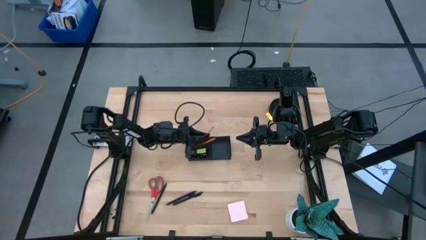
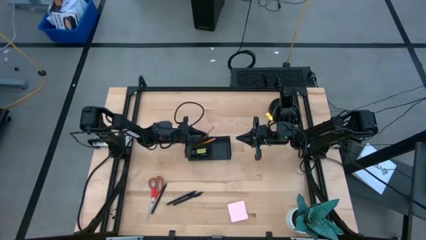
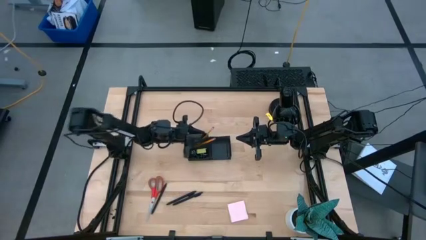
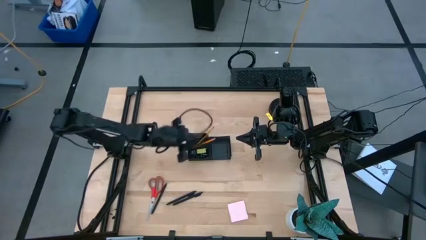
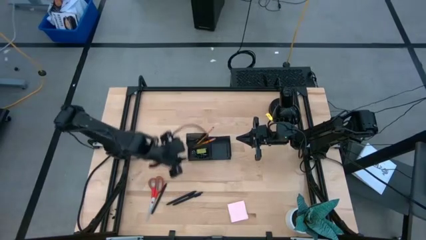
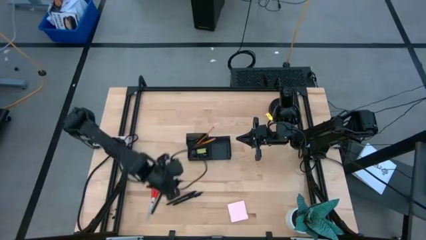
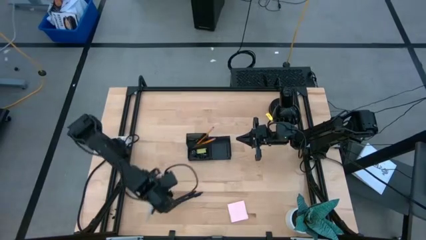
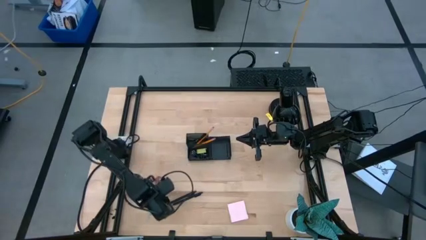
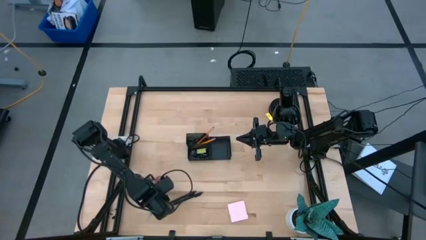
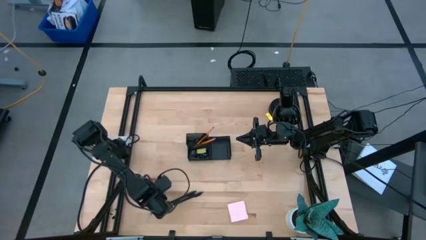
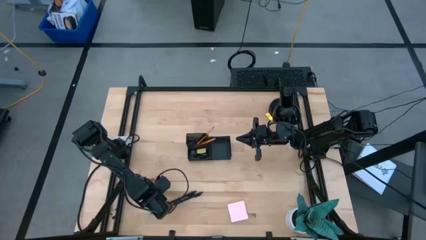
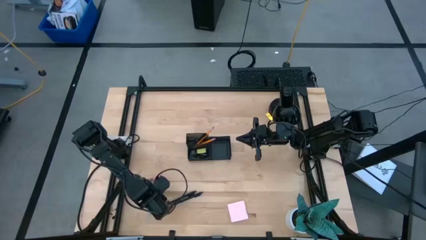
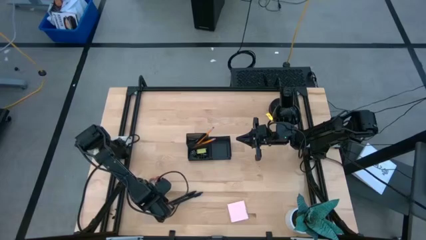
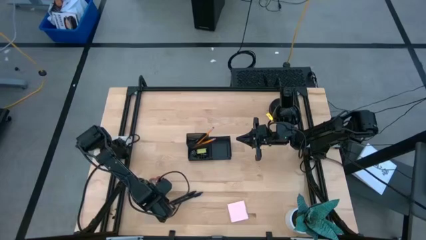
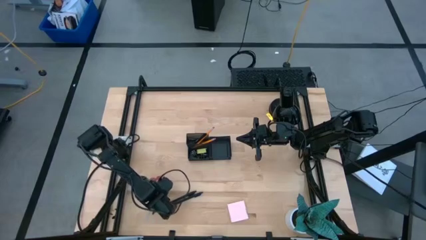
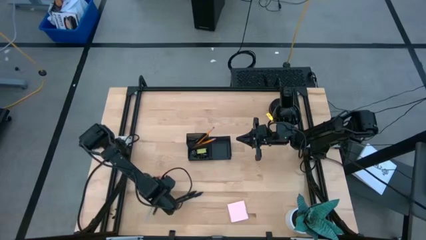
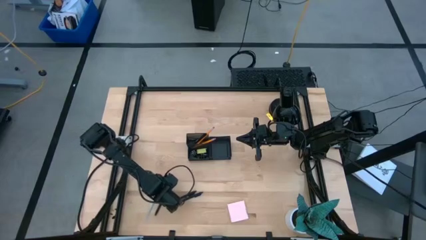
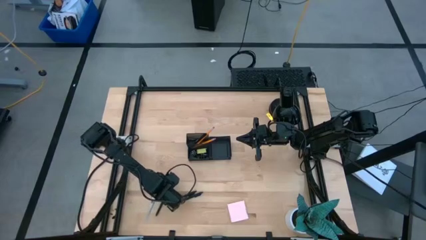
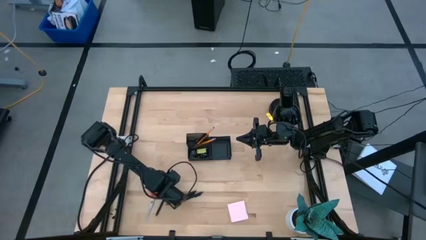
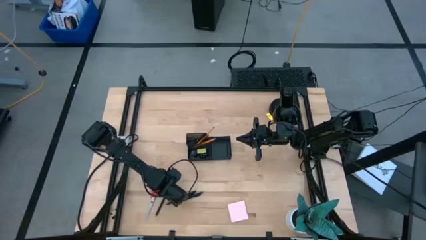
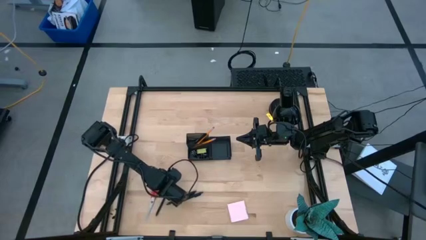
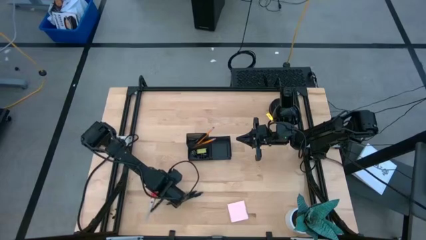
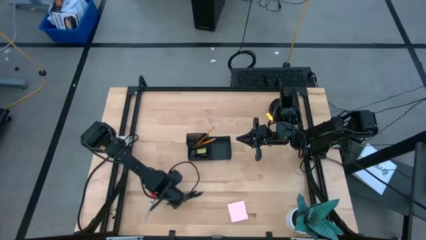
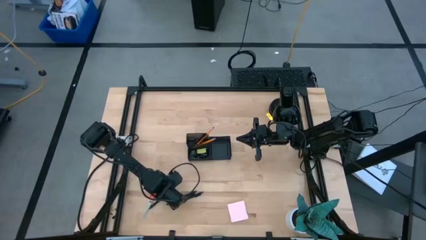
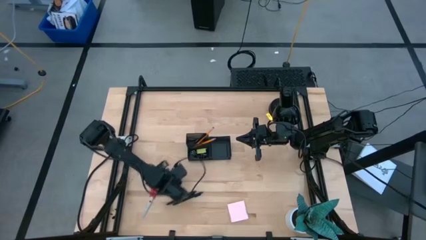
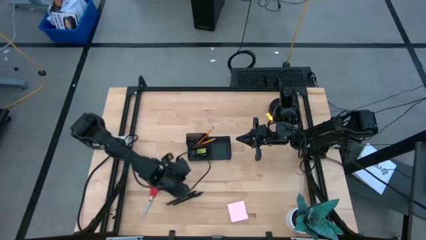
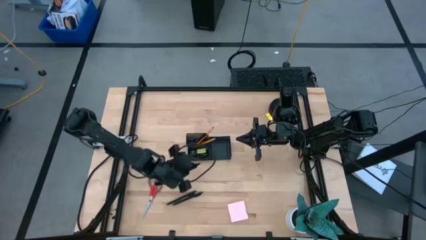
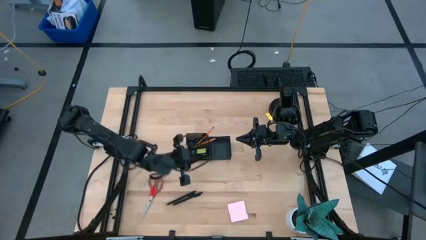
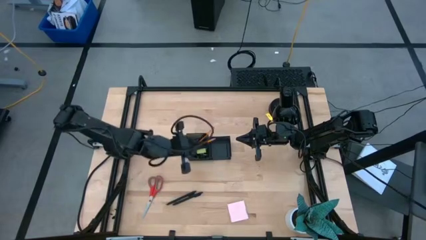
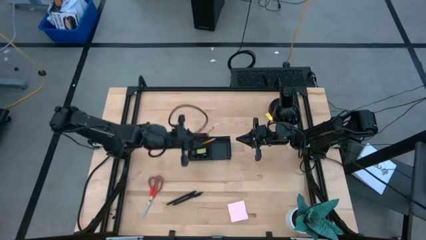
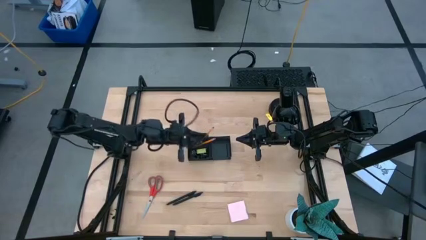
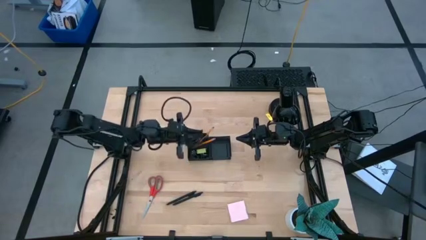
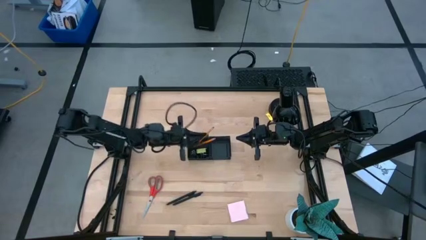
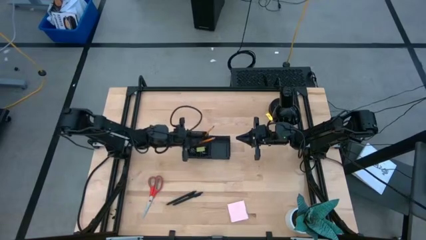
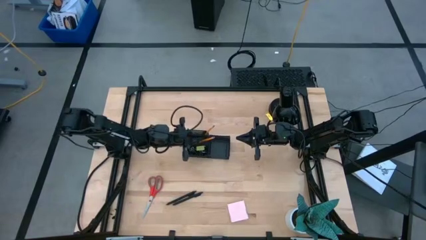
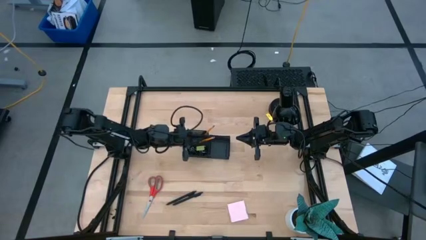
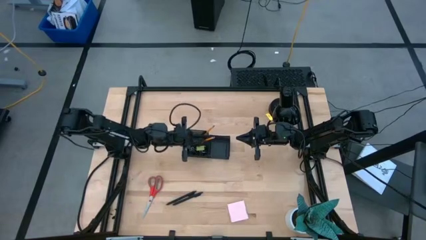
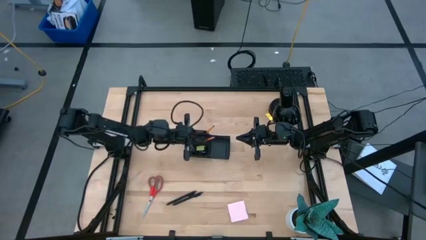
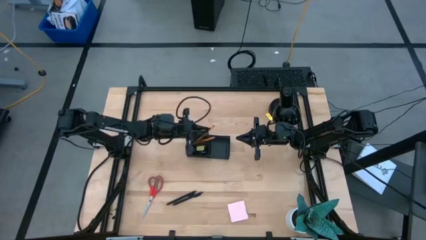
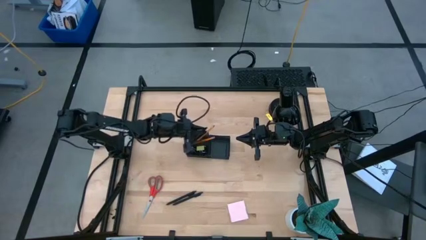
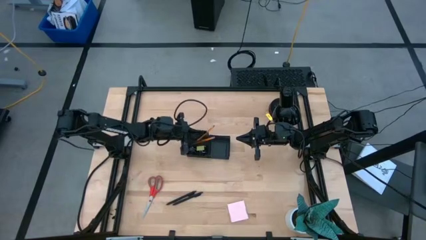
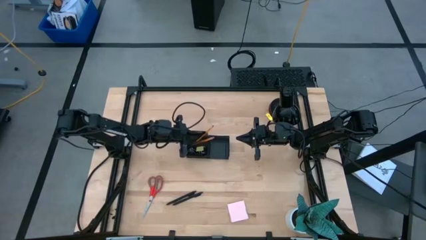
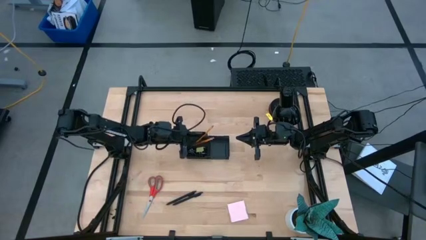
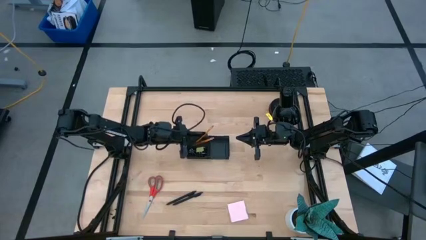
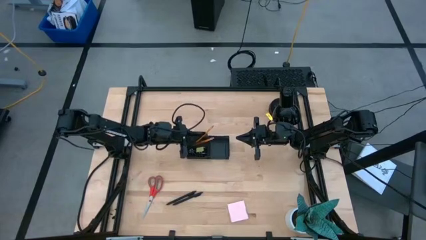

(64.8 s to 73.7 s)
Task: Pick and place office supplies into organizer
Put the left black pen into the black desk organizer

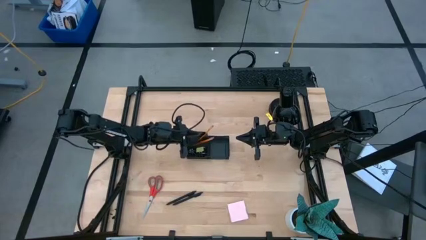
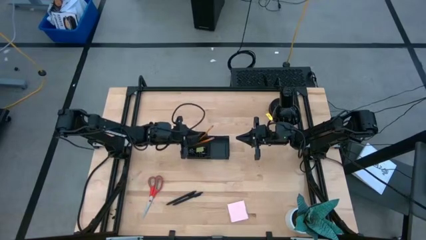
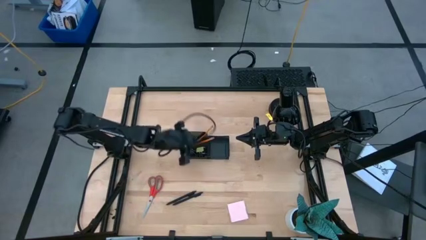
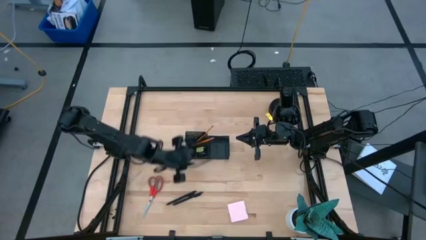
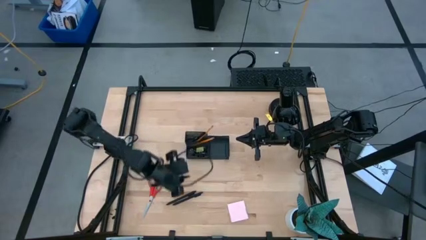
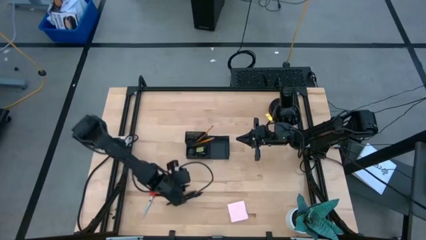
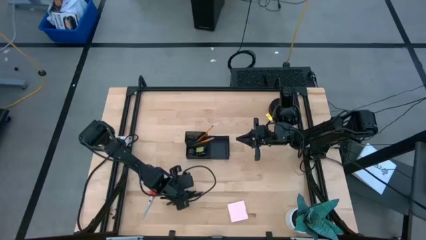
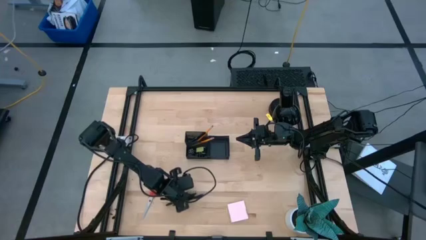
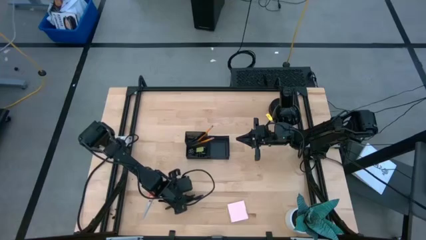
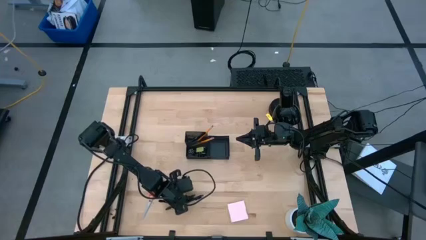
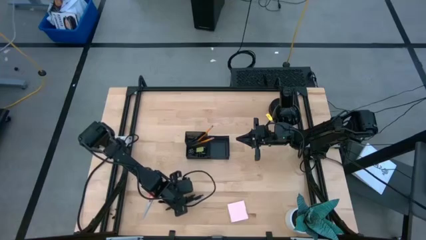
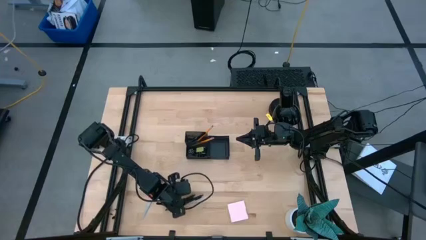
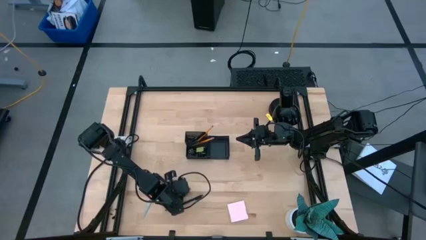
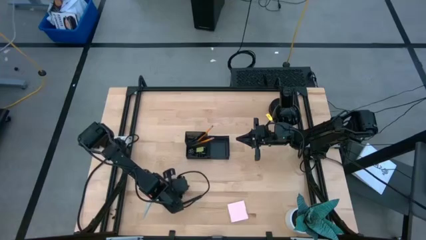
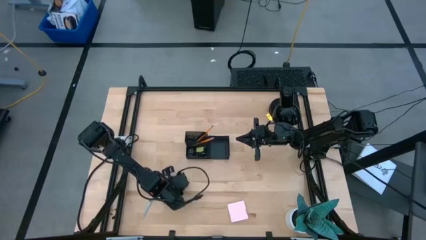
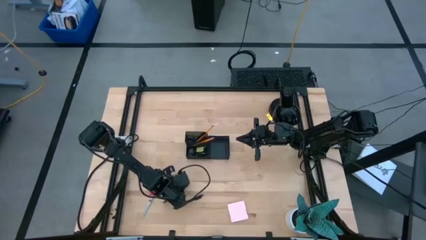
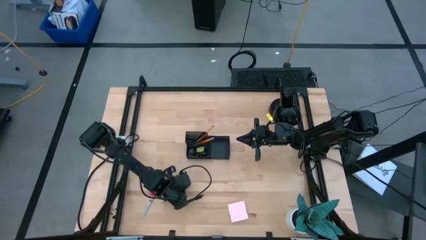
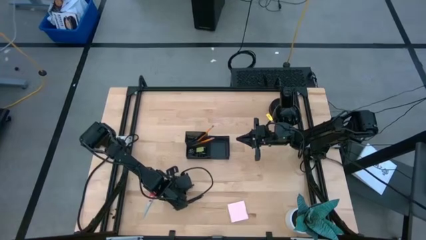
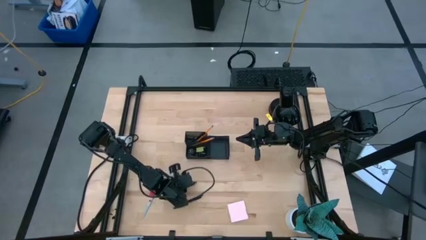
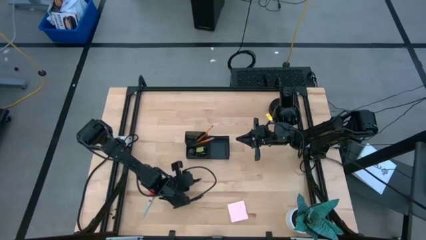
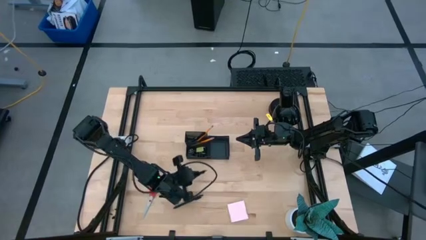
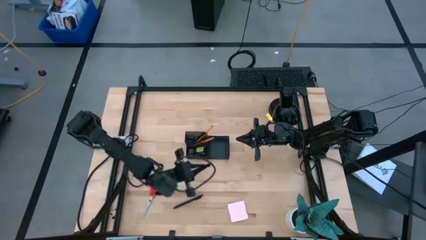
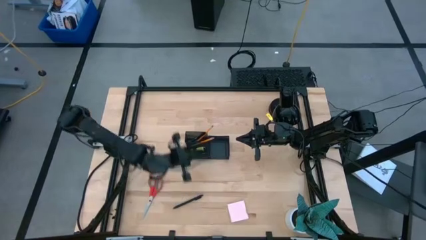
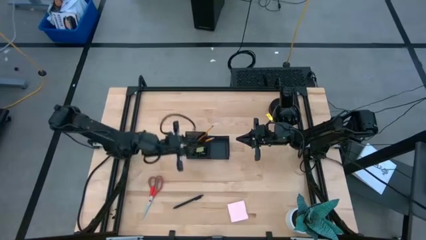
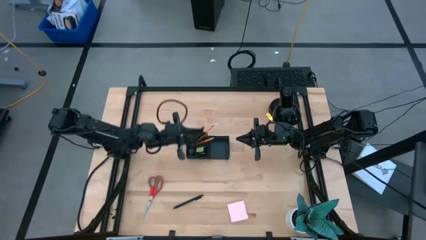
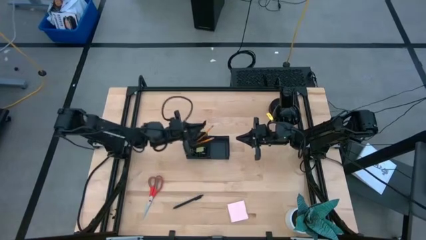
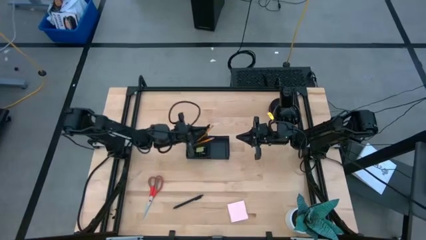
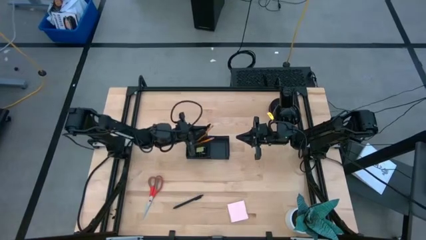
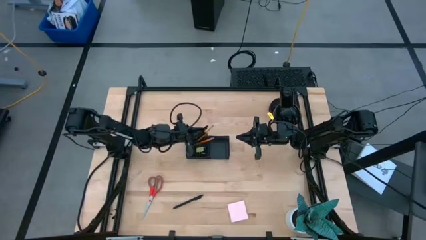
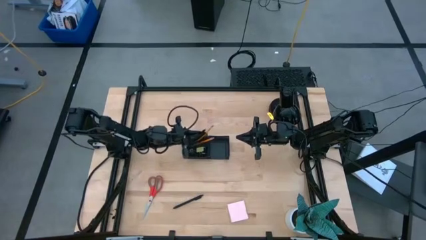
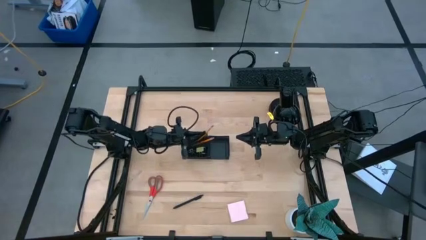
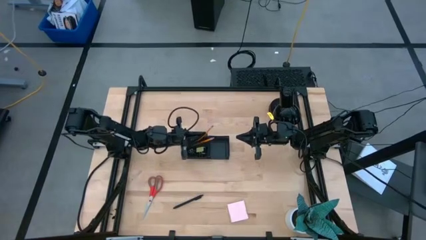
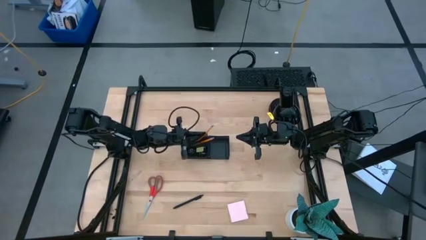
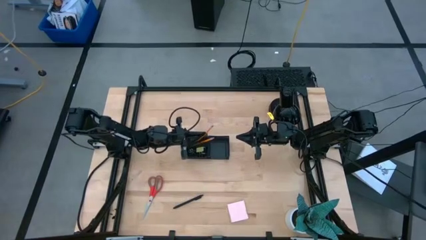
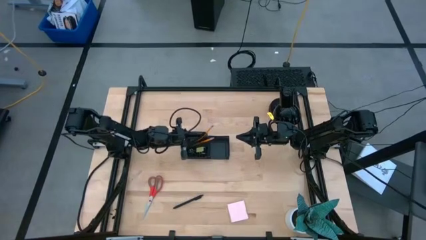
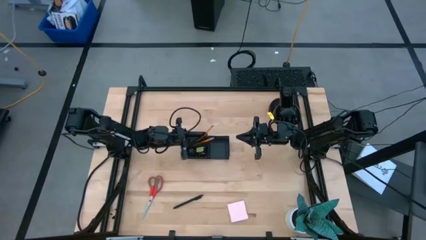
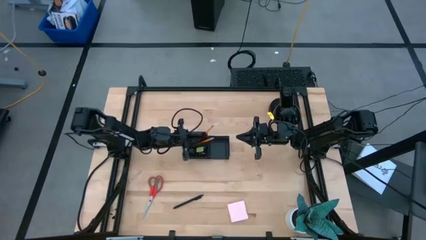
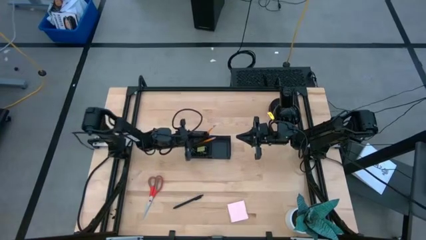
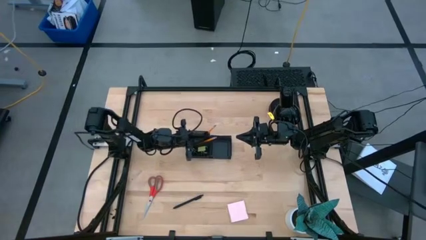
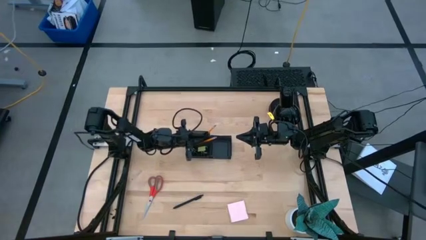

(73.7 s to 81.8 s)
Put the left black pen into the black desk organizer
